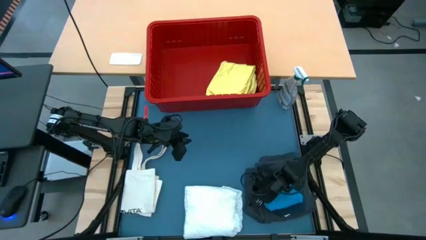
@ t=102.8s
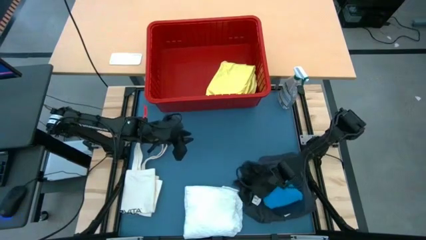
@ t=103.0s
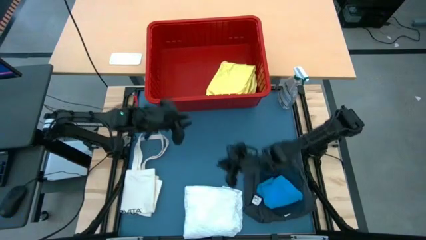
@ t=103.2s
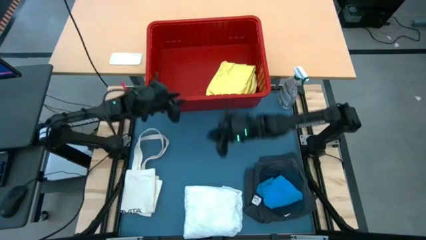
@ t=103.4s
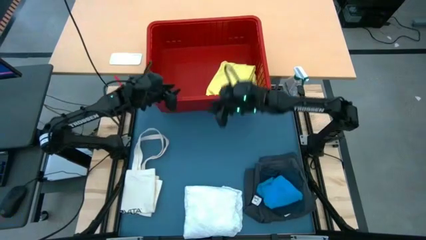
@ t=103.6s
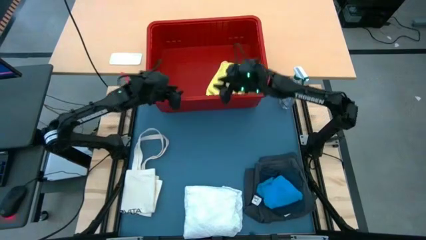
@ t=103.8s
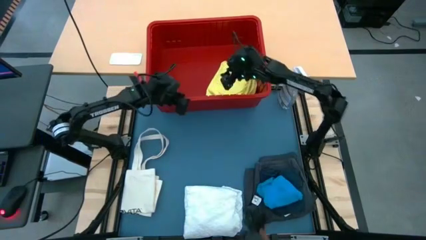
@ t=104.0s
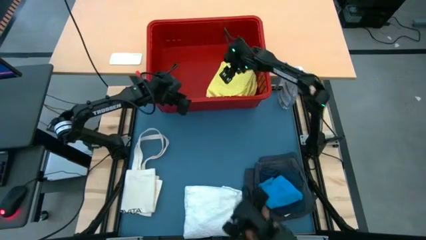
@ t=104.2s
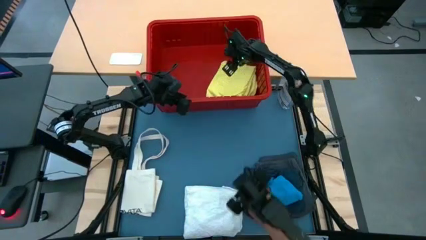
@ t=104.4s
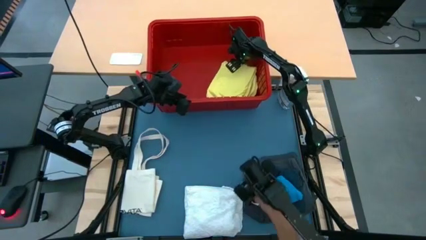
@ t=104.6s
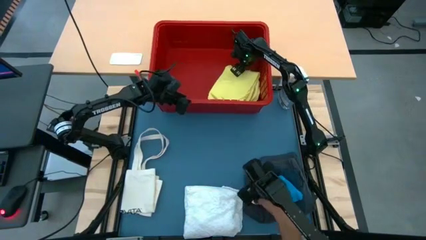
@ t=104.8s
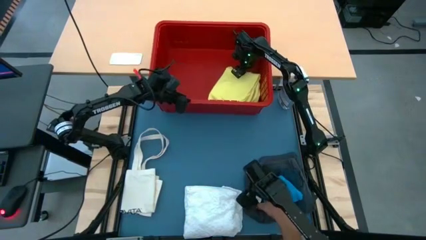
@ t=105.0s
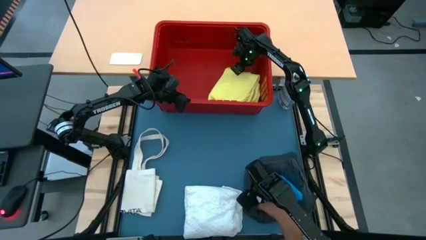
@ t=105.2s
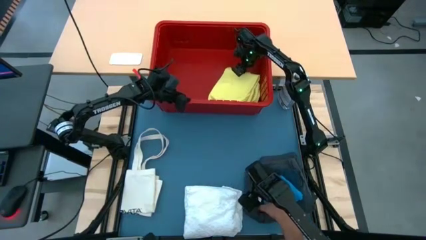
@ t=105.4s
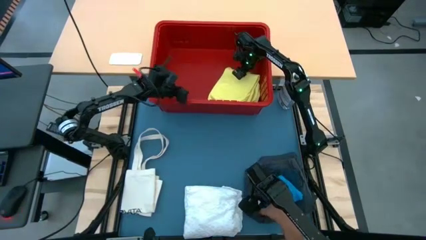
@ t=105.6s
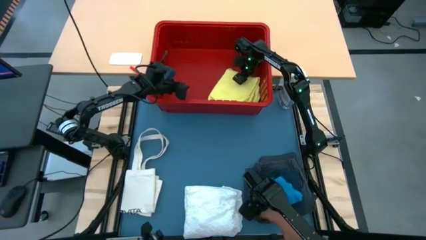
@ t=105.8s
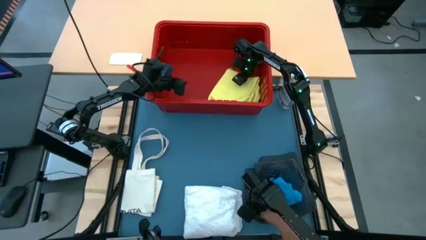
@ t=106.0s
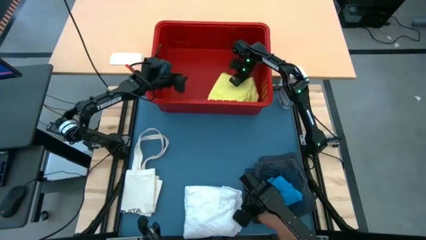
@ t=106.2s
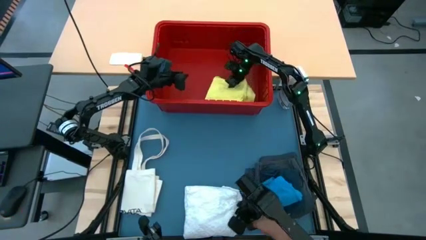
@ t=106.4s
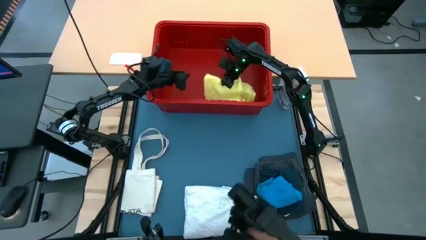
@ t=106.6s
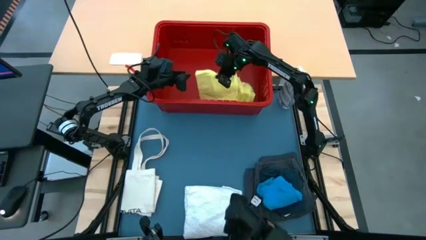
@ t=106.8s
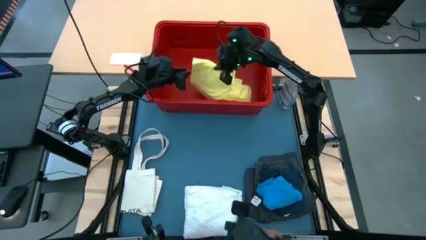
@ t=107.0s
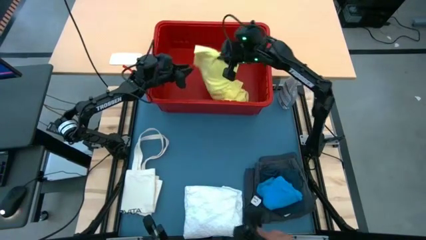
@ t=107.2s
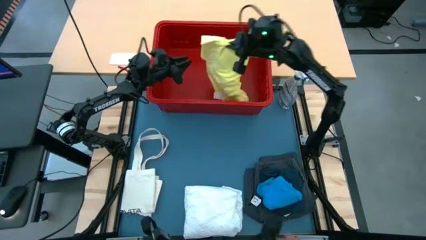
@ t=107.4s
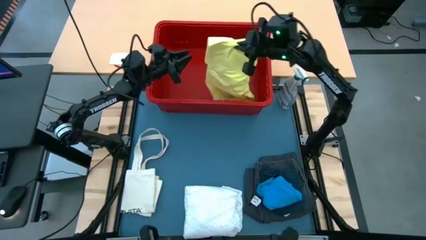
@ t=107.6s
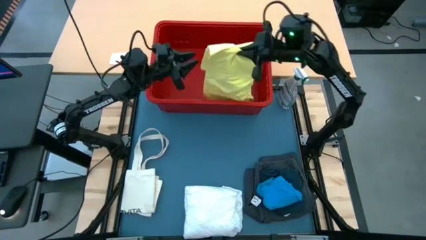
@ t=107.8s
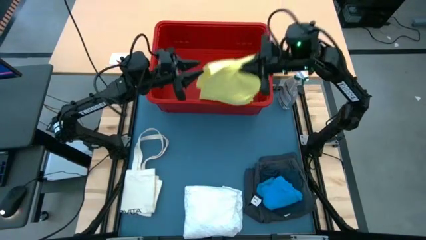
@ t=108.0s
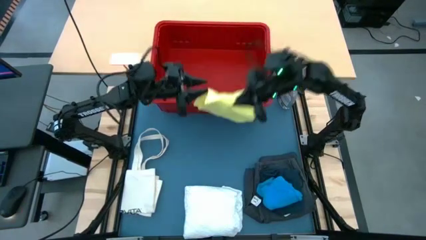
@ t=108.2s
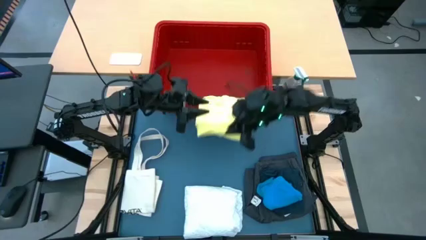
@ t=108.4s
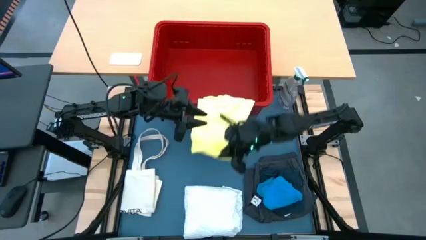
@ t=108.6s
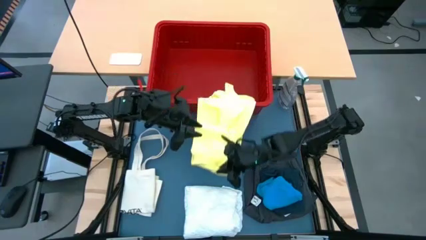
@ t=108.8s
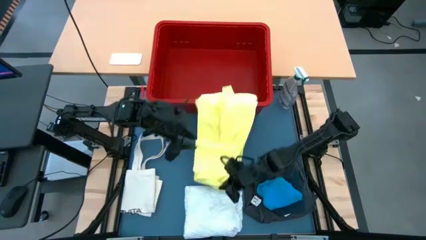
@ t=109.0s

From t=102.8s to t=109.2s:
Task: Fold Laundry from Bin
Remove the yellow shirt from the bin

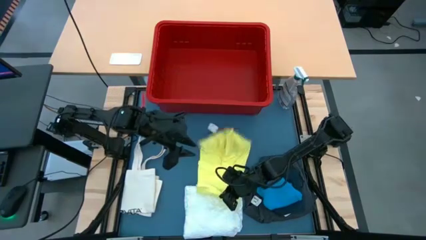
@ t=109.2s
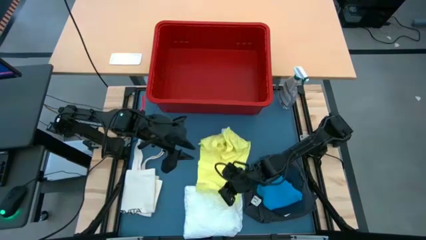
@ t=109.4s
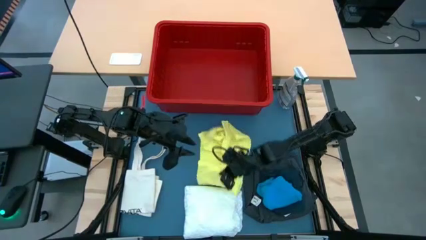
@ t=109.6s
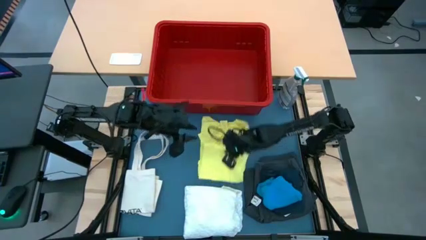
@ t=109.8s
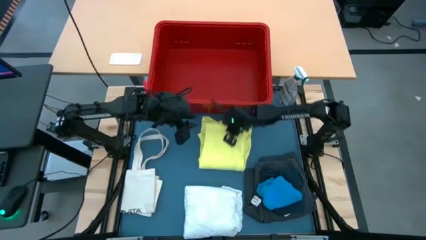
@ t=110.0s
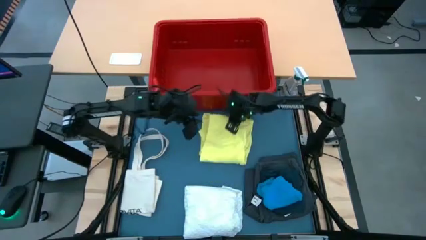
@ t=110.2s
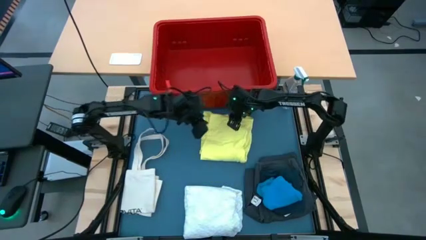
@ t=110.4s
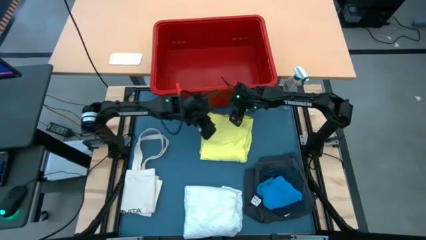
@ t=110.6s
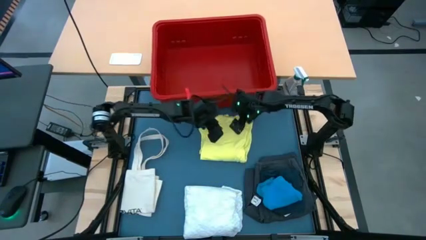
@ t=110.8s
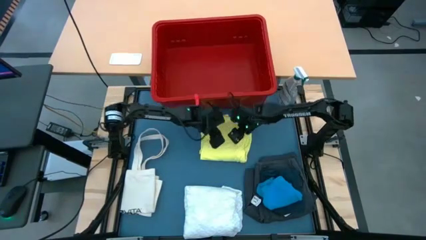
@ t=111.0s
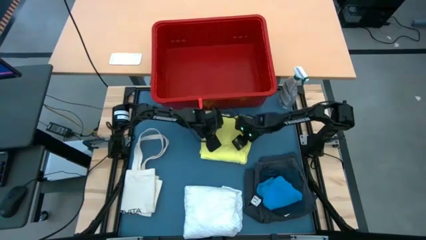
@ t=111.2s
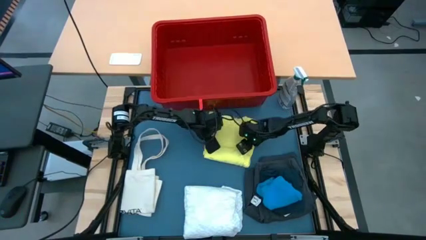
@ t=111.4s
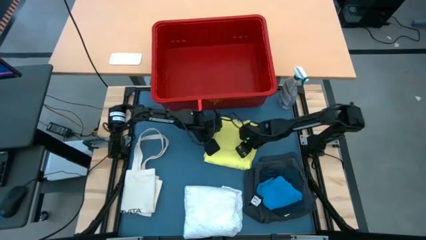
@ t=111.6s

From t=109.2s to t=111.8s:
Fold the yellow shirt

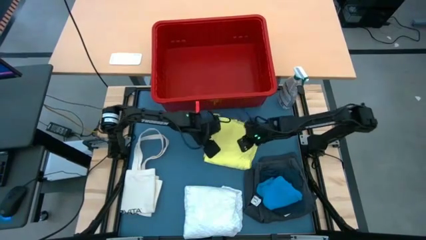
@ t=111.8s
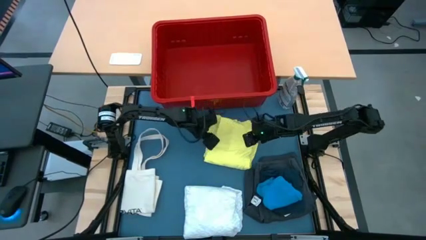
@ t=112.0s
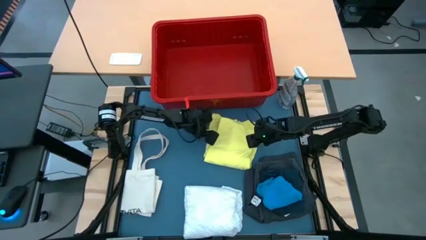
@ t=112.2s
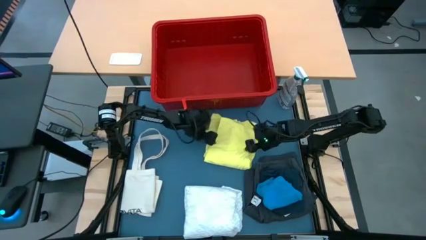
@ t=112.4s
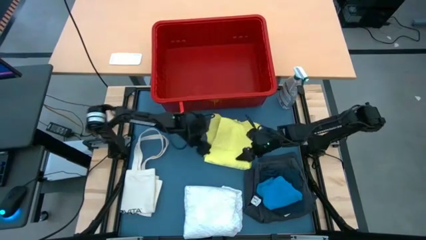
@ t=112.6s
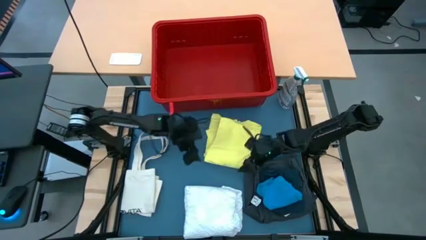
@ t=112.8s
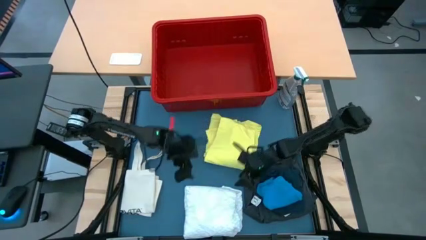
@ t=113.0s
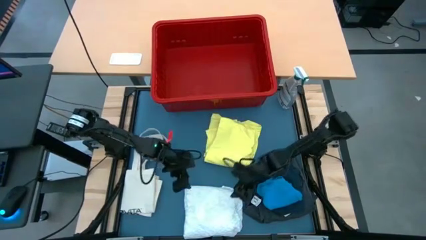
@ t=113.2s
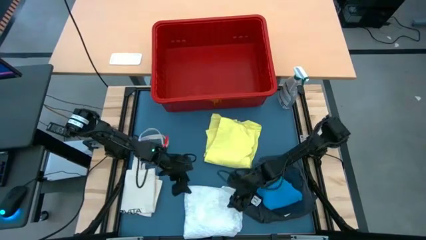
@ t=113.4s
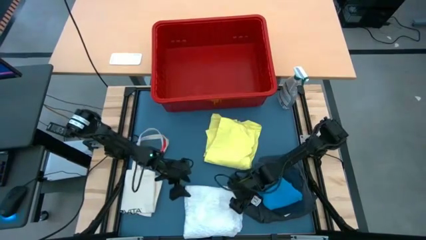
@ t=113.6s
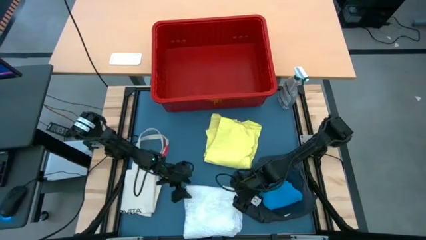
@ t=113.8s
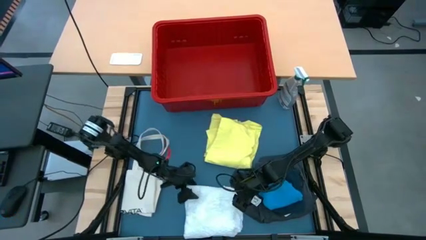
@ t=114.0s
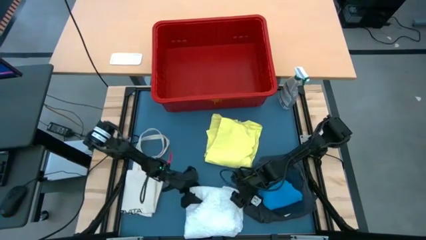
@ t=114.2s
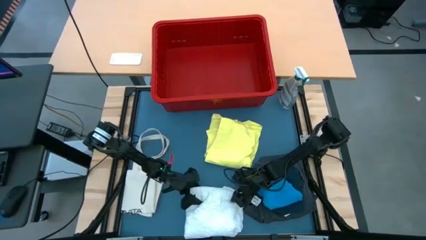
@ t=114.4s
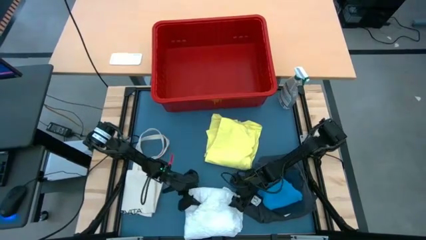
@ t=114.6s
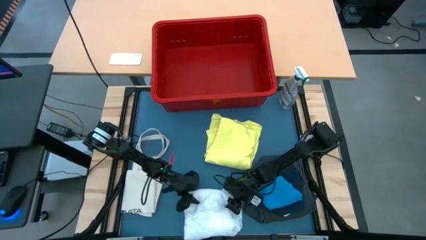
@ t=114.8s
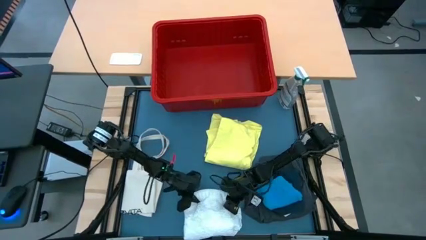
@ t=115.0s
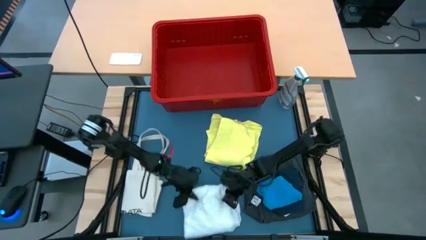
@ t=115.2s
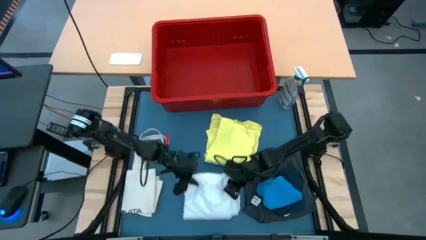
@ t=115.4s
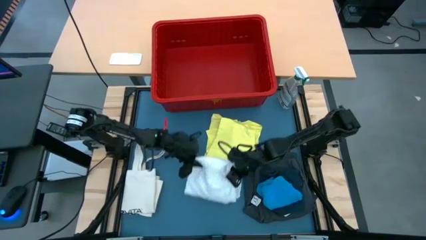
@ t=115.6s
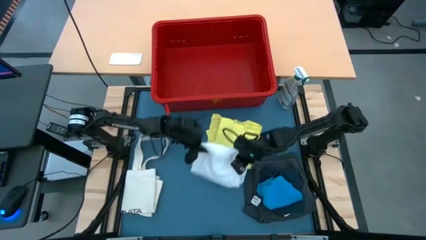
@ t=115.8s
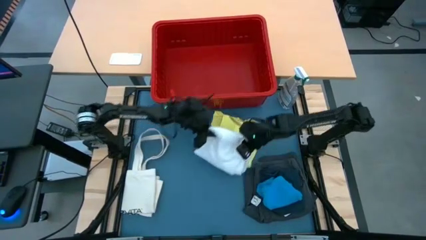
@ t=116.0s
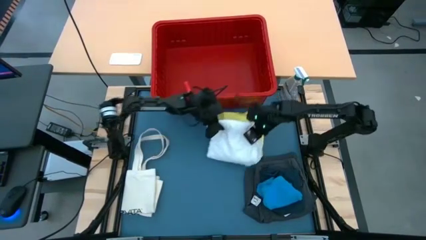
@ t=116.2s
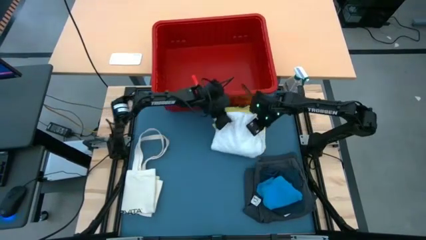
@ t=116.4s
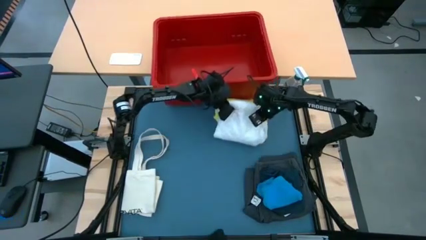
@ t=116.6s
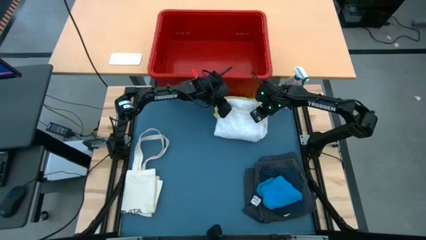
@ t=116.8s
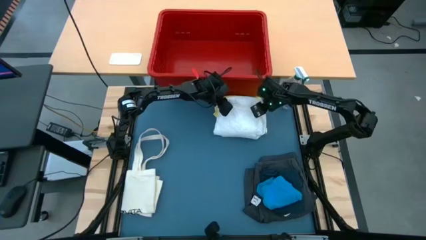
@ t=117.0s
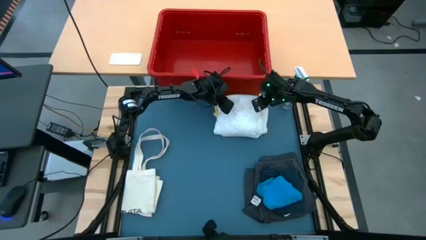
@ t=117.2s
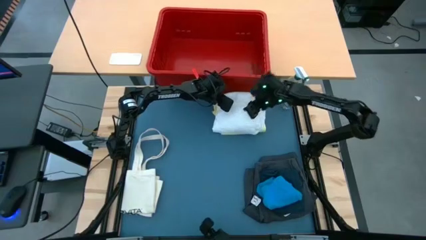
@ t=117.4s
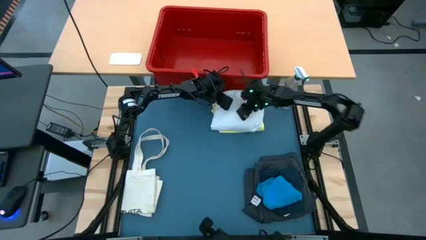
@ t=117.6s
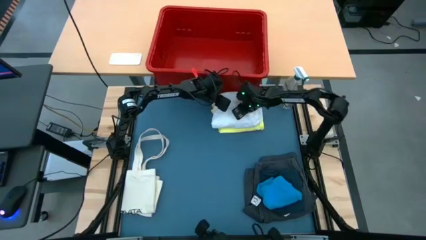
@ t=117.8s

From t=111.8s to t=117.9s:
Stack the folded white shirt on the folded yellow shirt

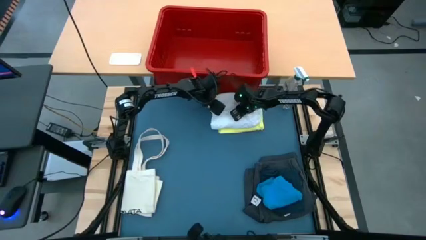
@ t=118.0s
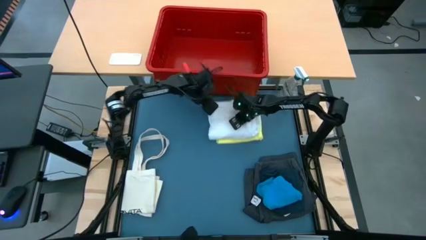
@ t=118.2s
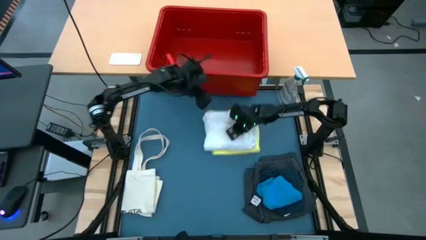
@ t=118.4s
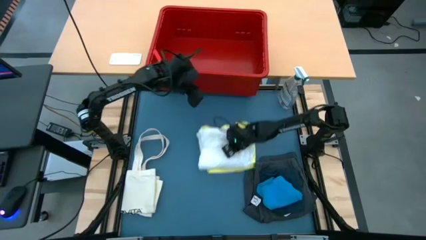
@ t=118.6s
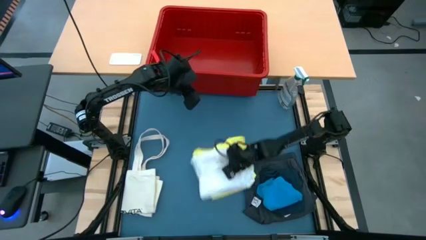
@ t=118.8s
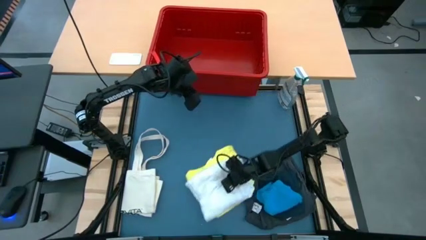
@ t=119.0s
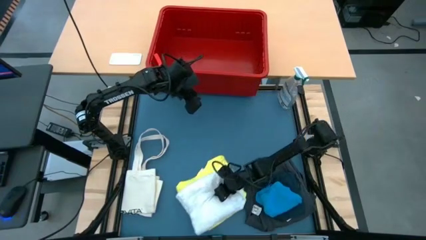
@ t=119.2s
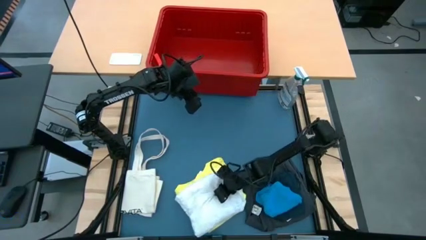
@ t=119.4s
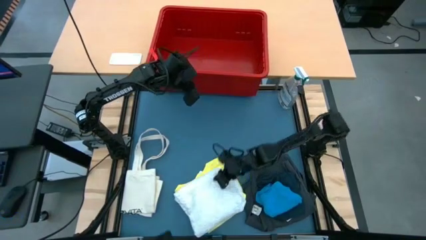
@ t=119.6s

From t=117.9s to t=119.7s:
Move the stacked folded shirts to the bottom of the table

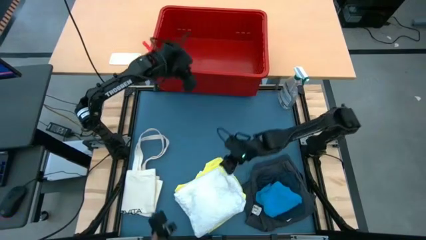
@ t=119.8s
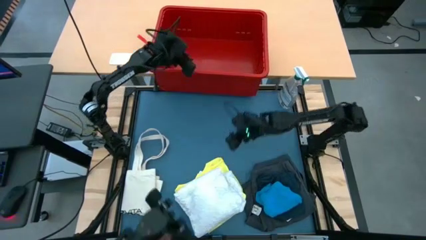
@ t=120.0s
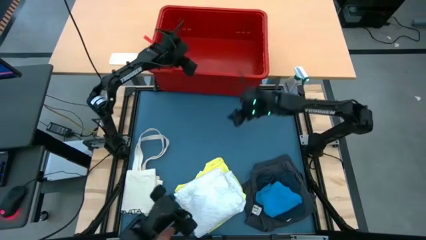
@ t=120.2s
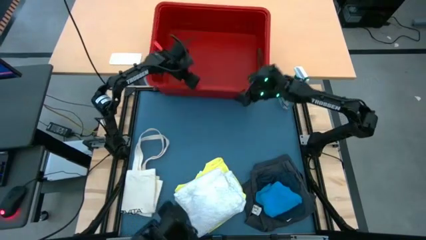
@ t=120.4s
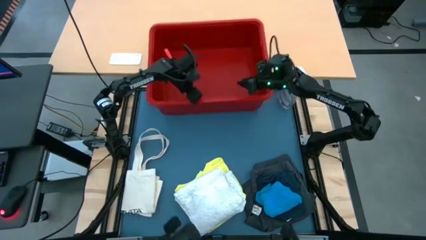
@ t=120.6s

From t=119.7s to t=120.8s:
Adjust the bin to the top of the table
